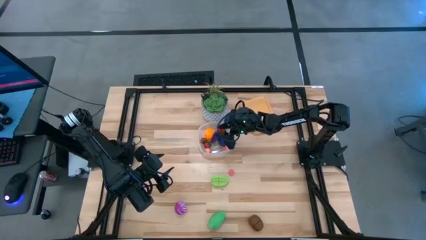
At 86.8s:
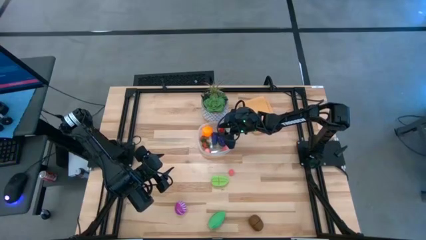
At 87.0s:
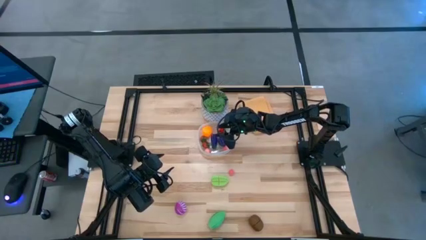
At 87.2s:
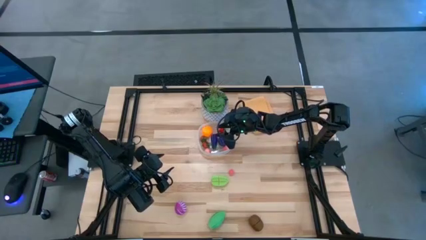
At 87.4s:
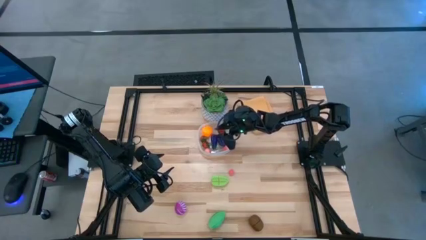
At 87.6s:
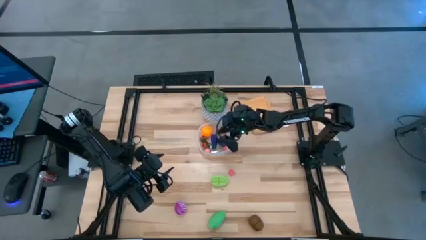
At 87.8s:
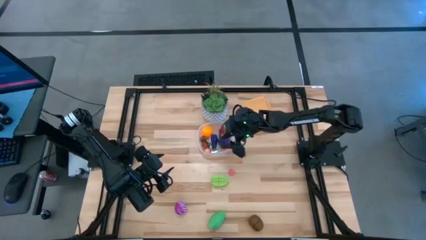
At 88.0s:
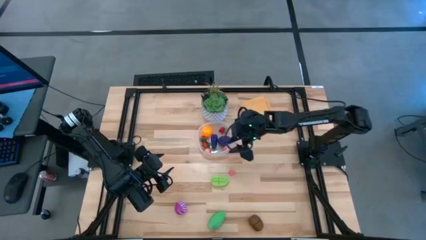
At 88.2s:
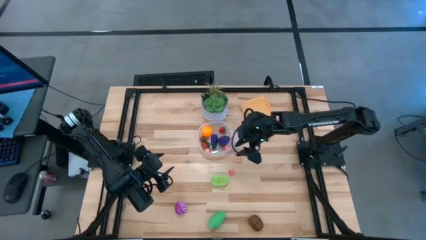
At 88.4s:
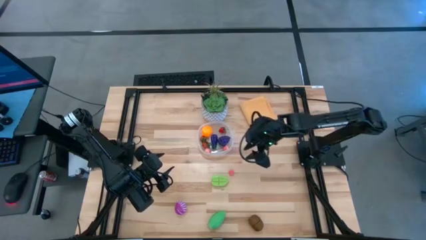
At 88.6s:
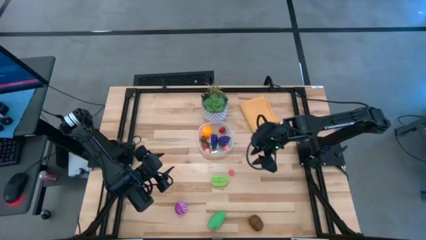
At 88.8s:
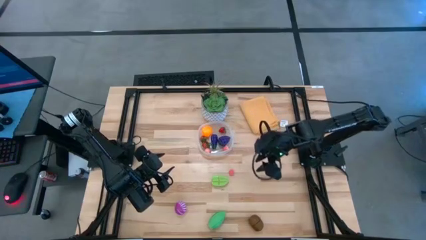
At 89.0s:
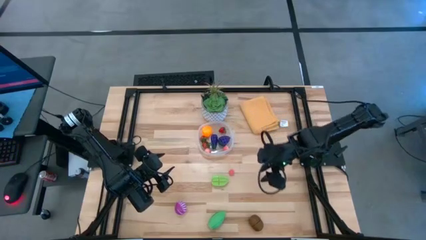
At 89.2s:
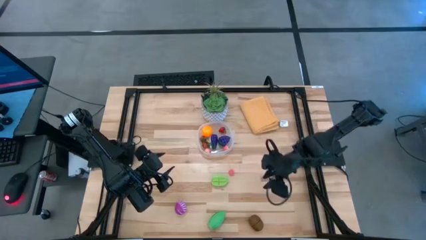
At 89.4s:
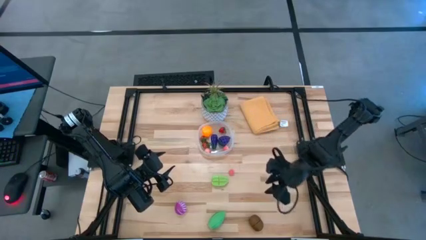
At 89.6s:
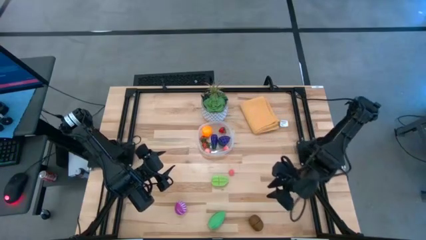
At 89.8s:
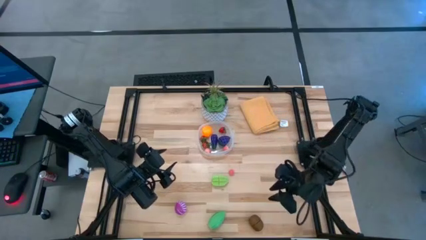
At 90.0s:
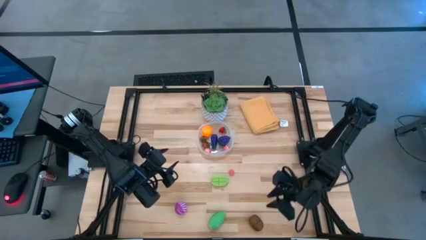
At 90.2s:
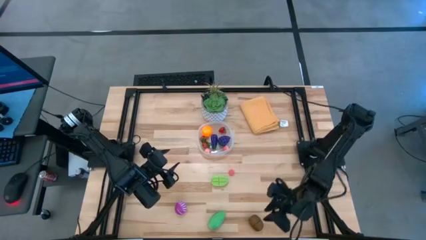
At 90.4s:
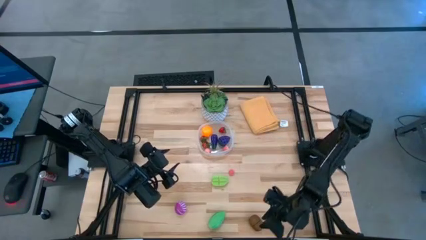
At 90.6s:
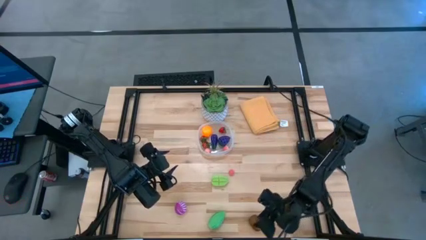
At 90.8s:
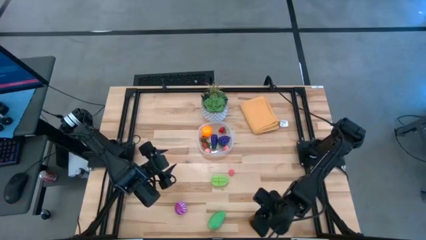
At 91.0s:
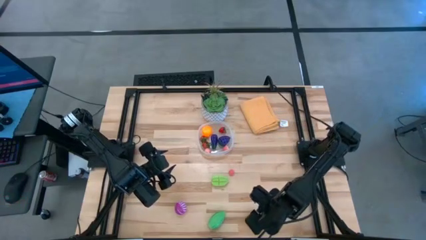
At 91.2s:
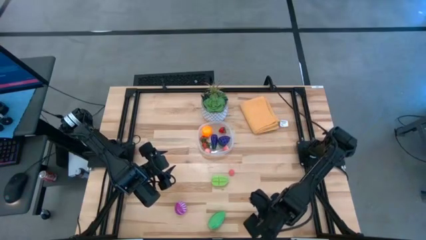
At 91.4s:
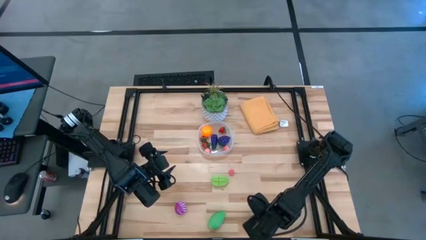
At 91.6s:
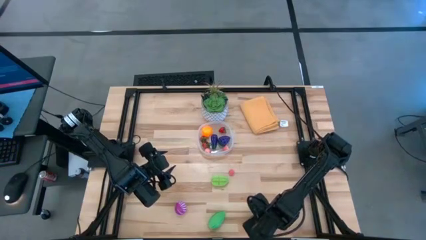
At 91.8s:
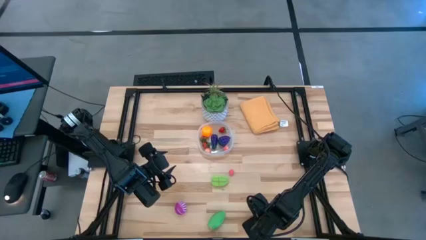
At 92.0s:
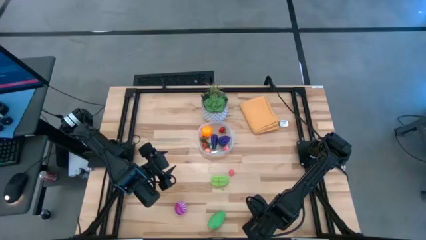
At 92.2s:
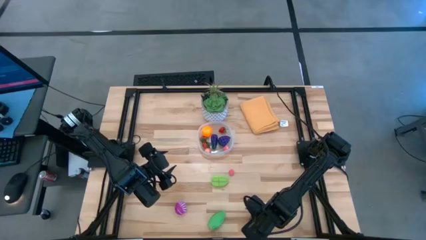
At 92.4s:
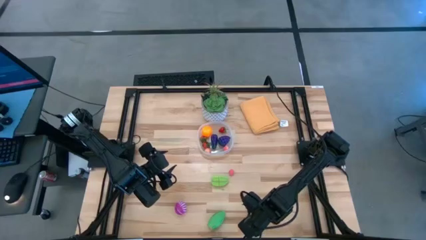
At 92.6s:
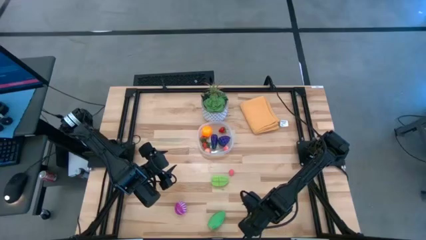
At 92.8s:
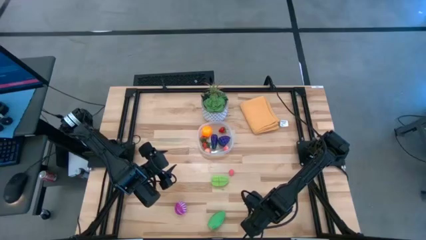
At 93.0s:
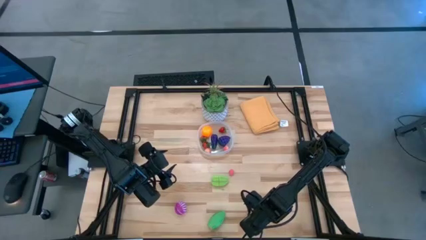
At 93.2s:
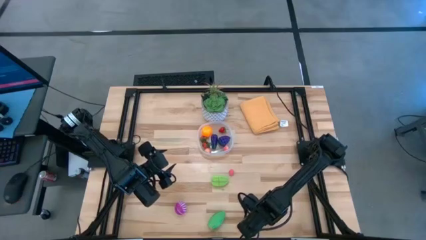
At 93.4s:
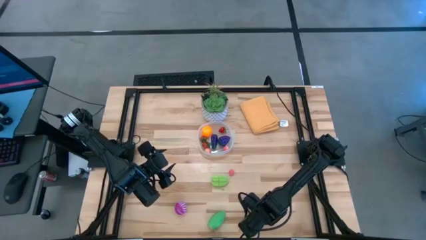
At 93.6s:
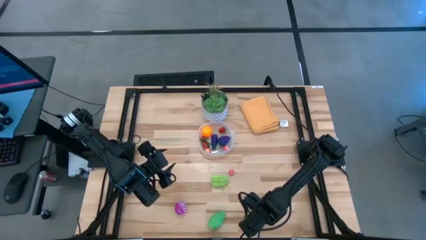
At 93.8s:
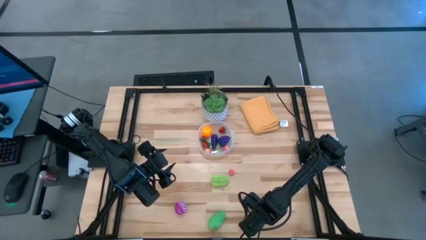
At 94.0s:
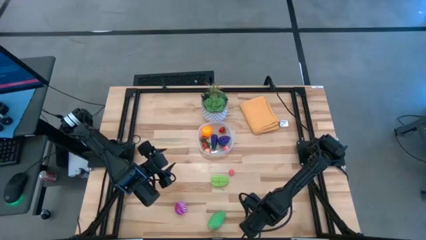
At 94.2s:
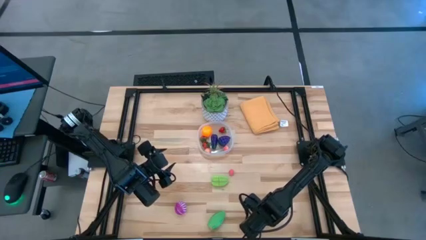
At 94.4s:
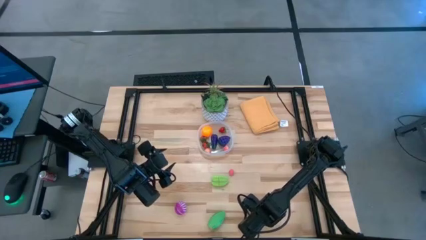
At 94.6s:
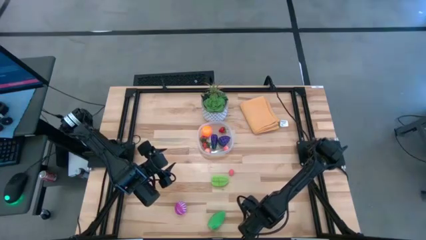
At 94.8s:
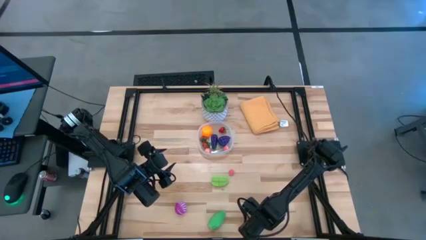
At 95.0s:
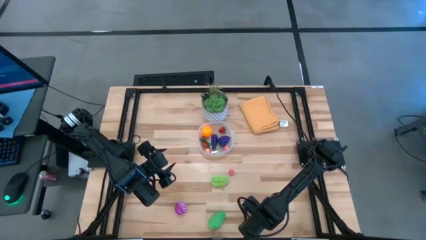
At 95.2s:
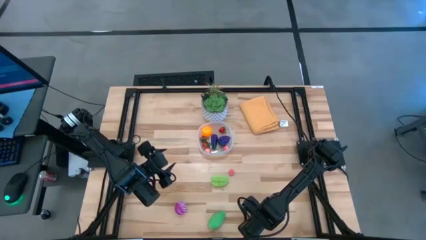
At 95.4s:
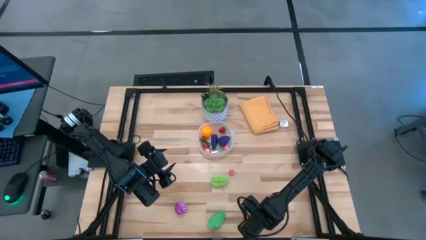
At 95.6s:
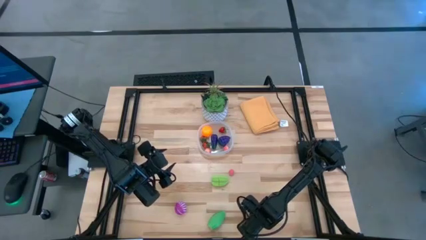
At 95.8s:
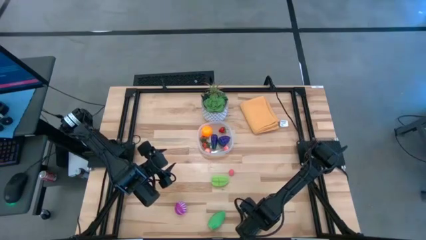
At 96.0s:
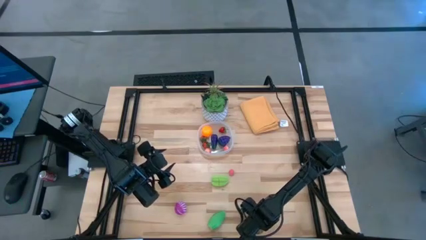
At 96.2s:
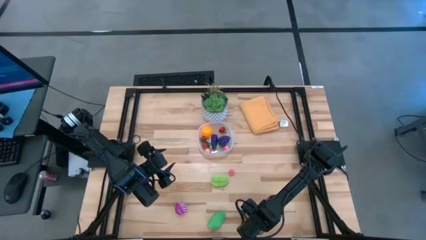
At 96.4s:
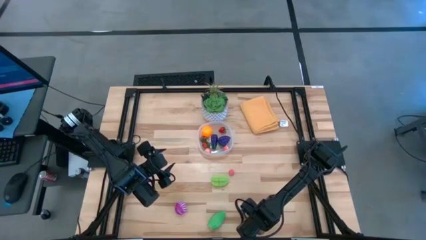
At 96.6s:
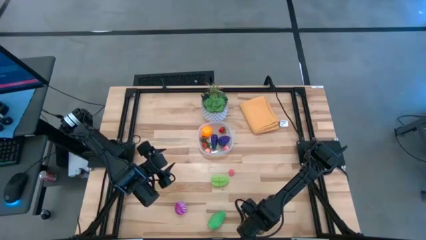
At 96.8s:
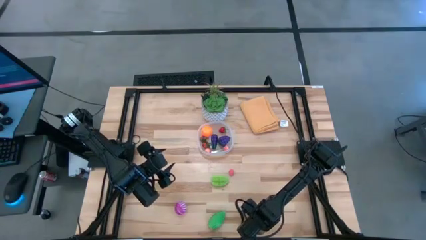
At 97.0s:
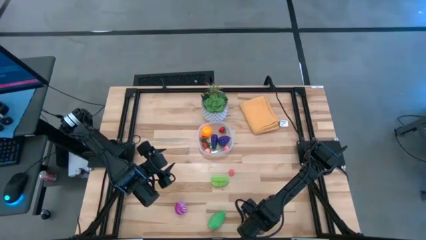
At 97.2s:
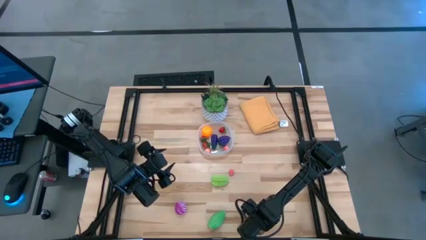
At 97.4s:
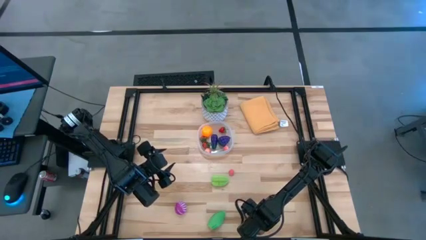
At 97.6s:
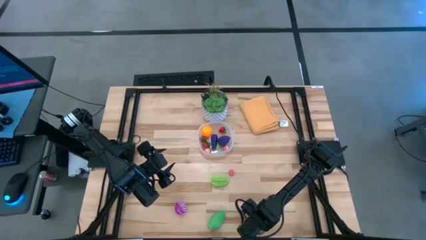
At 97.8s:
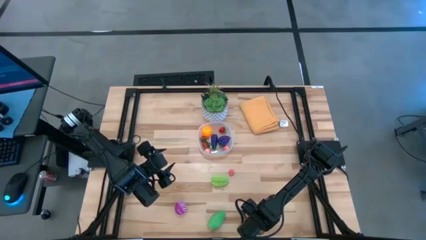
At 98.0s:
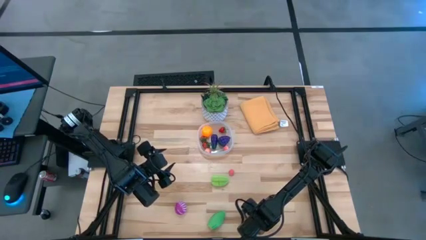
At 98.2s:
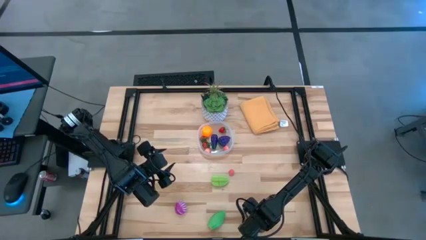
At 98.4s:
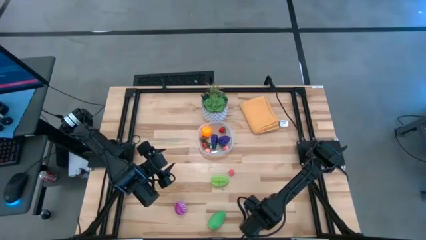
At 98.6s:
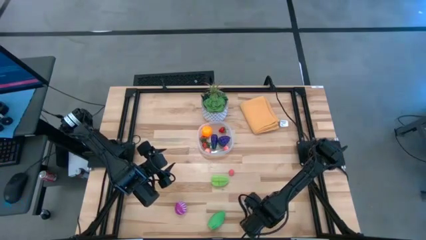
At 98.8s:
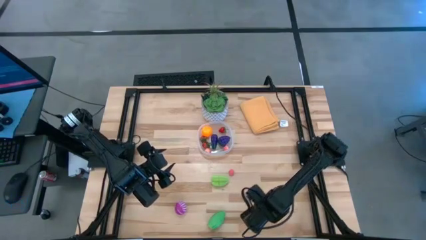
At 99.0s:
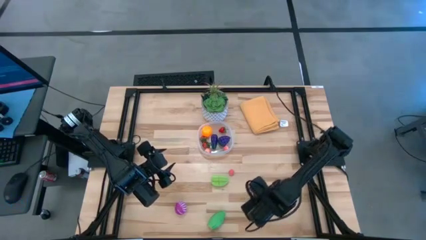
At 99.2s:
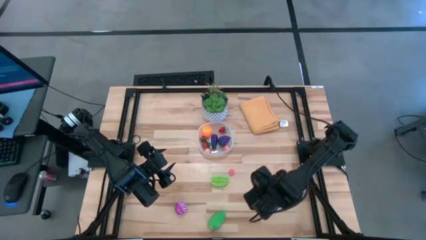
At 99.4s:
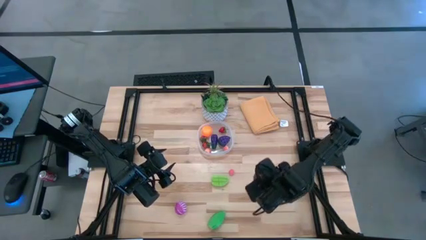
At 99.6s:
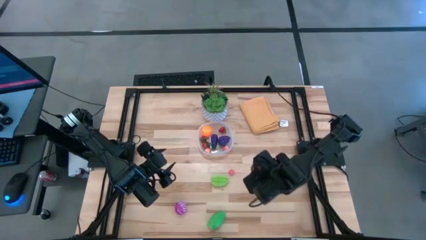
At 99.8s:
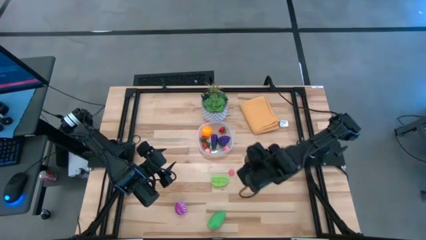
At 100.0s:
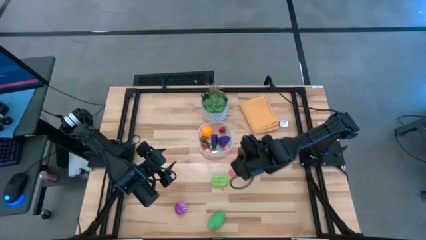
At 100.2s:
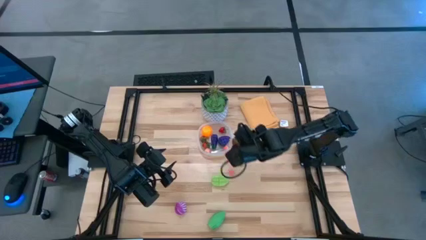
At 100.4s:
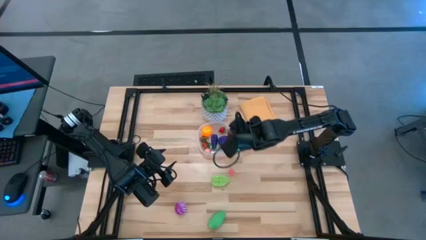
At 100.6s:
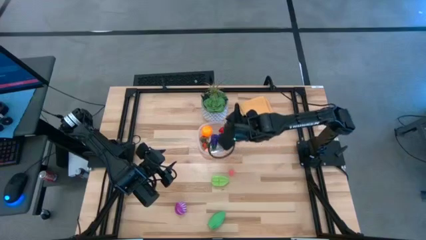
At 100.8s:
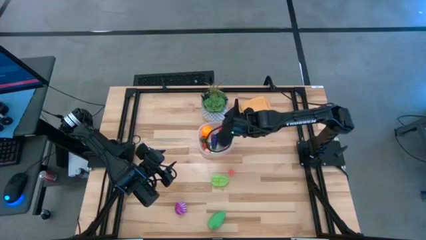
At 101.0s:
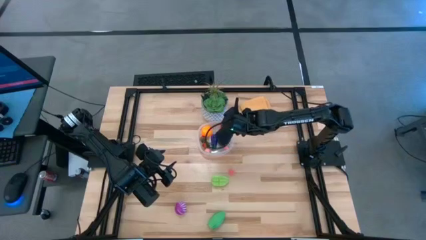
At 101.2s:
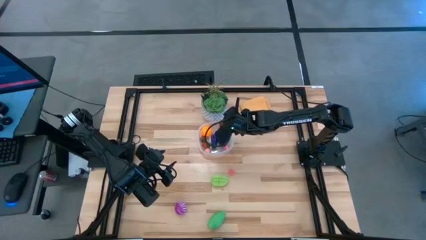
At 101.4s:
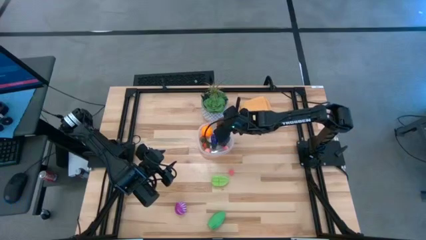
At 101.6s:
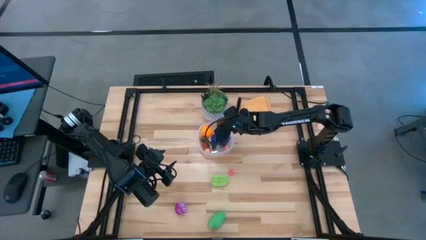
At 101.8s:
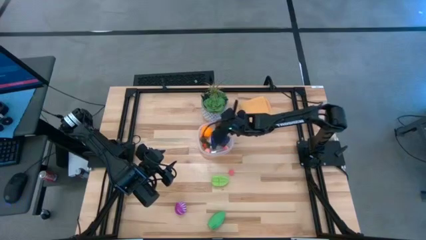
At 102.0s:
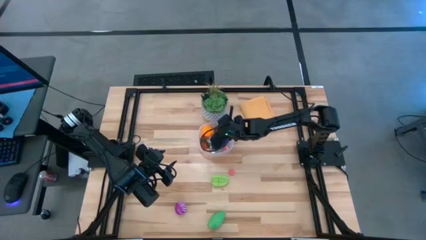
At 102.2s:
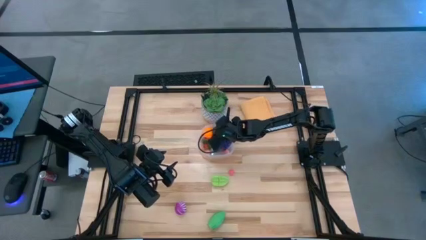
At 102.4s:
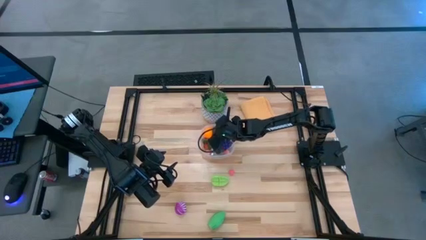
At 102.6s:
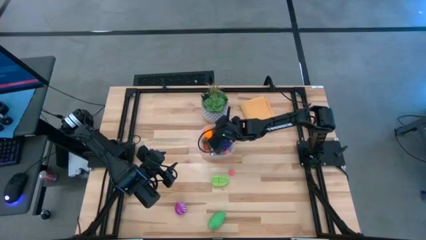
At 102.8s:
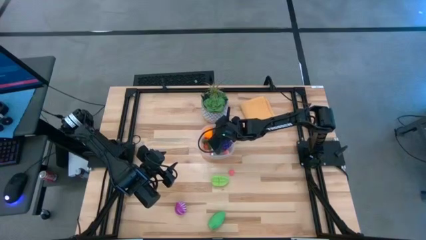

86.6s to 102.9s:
Task: Pick and placing Produce into tupperware
Put the brown kiwi into the transparent bin
